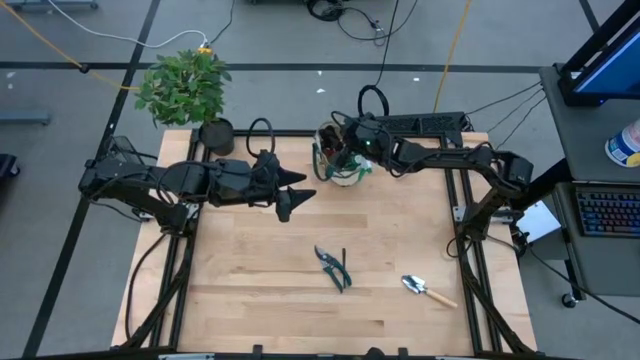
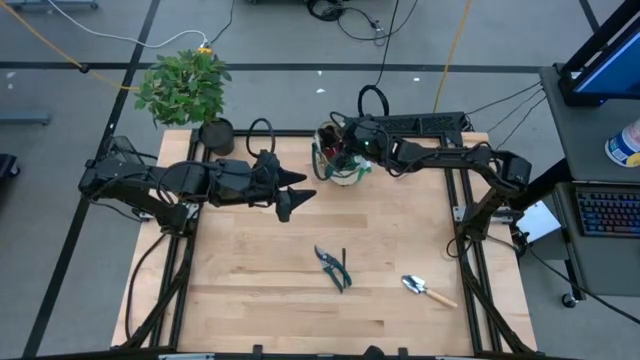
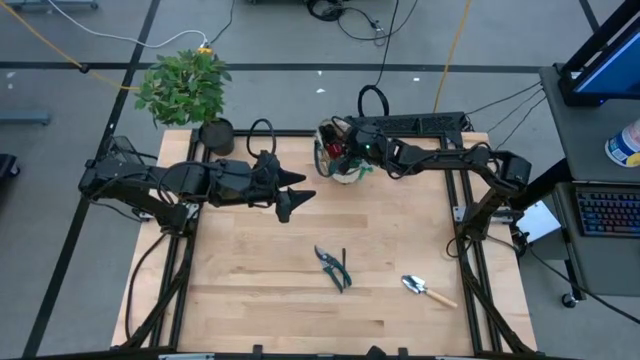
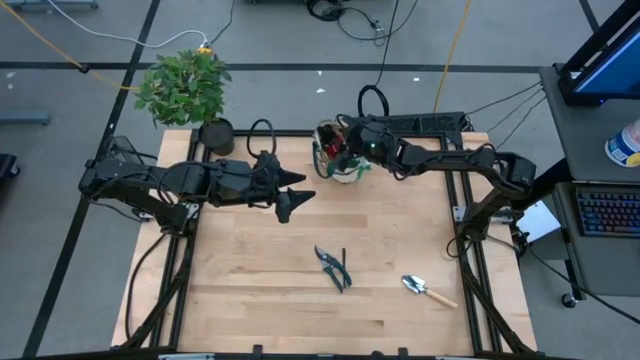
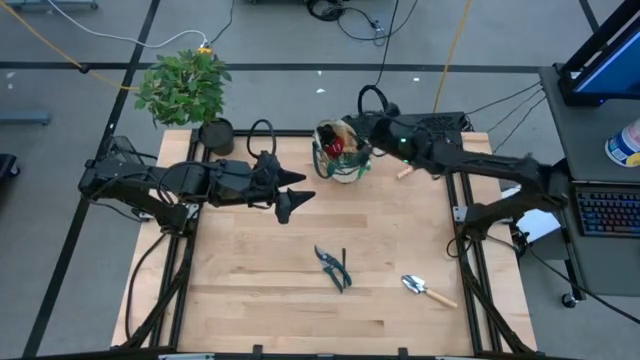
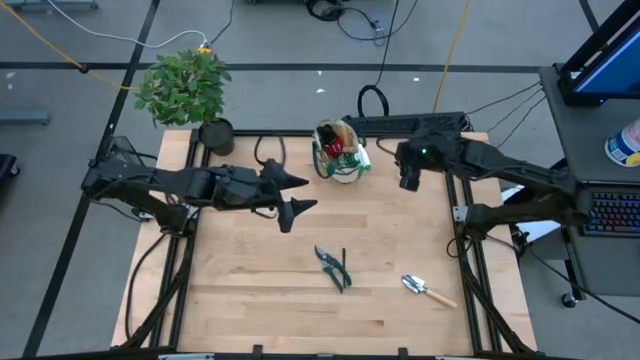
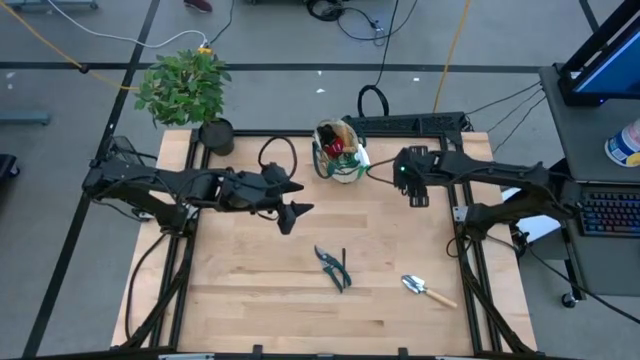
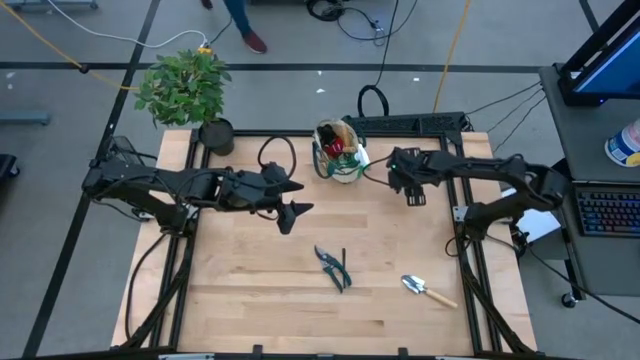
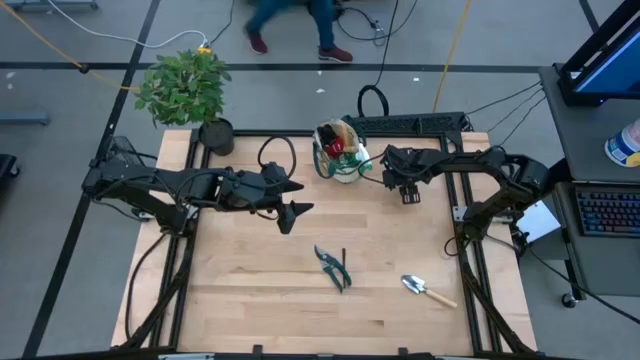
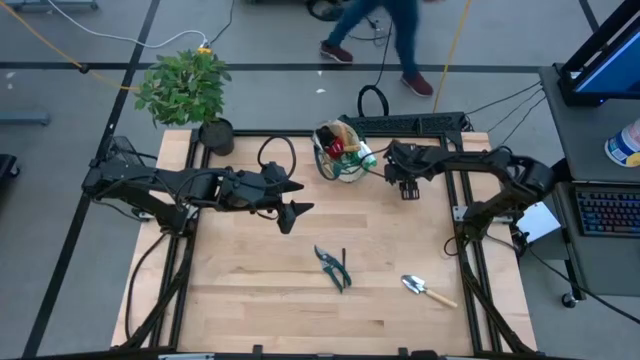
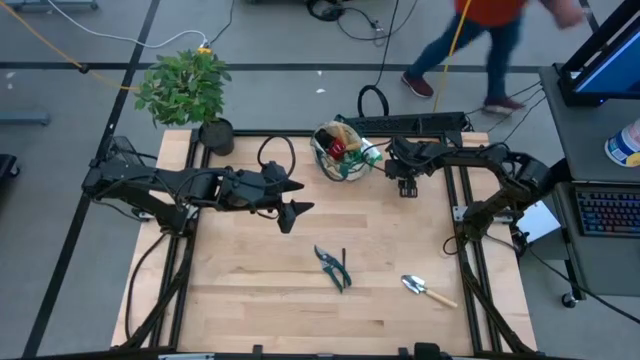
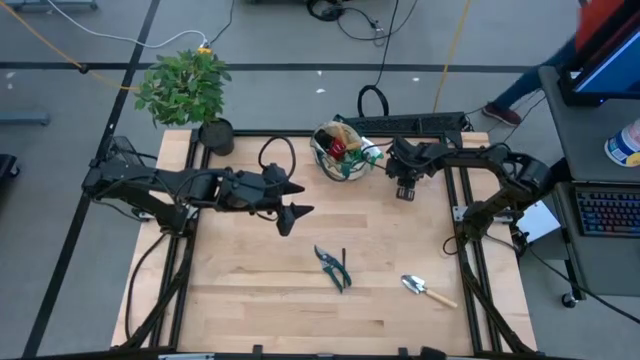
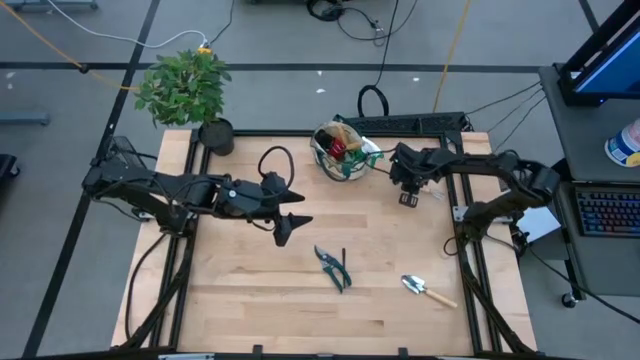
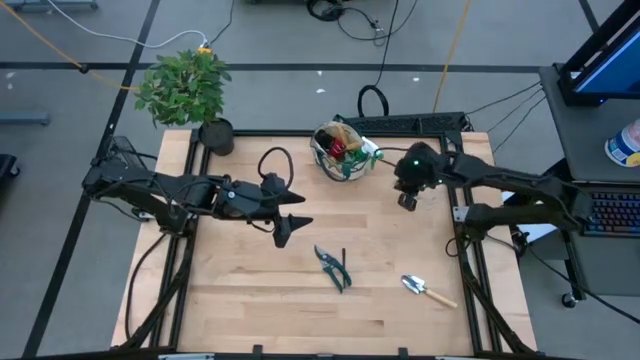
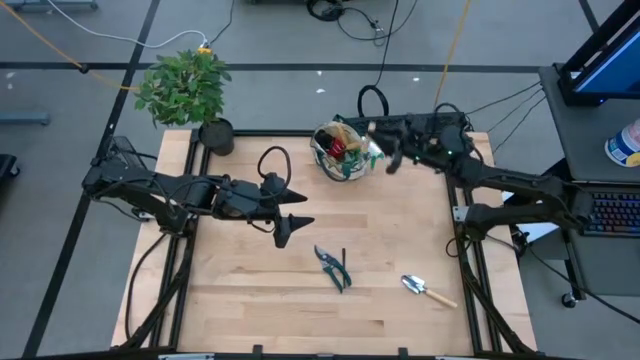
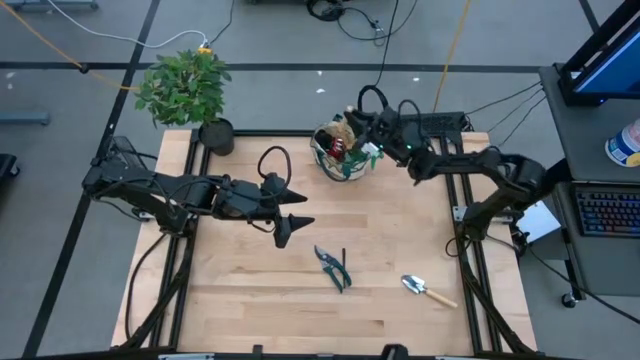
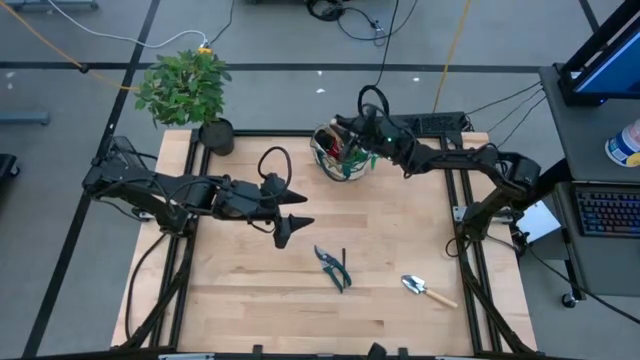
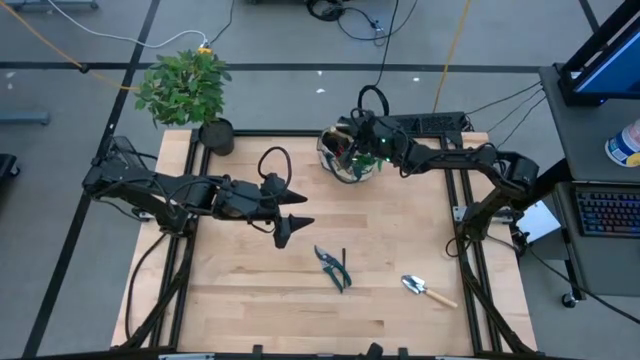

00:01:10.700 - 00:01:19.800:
Task: Pick & Place Garden tools in Gardening bag
Put the hand rake into the gardening bag

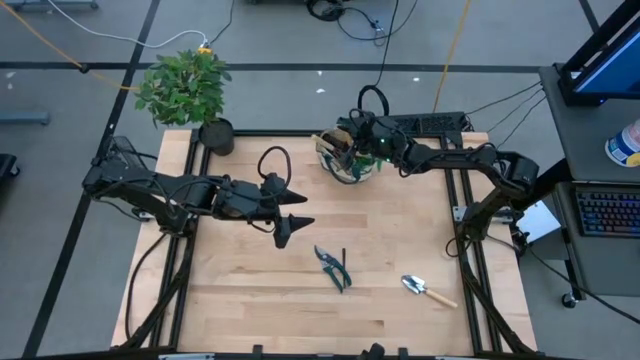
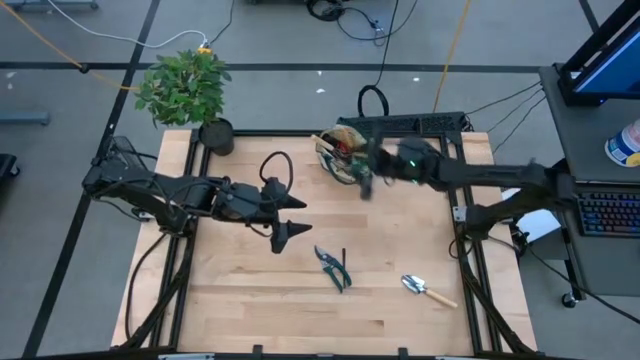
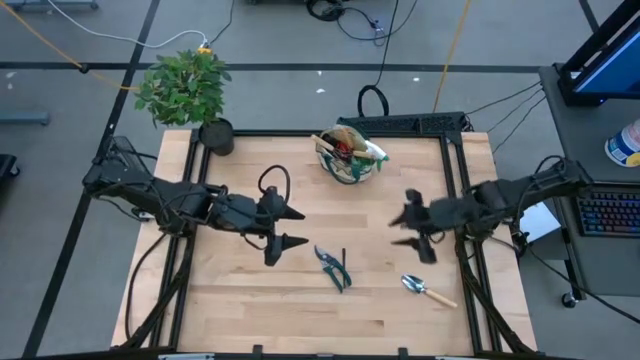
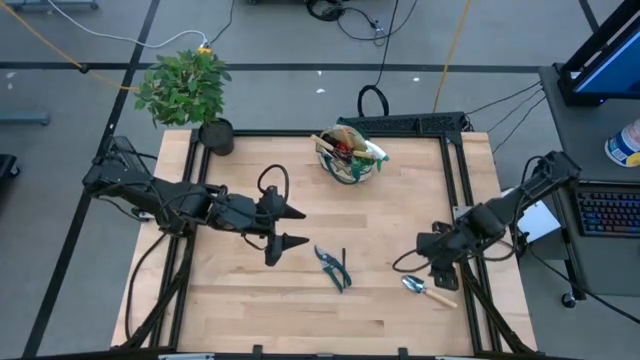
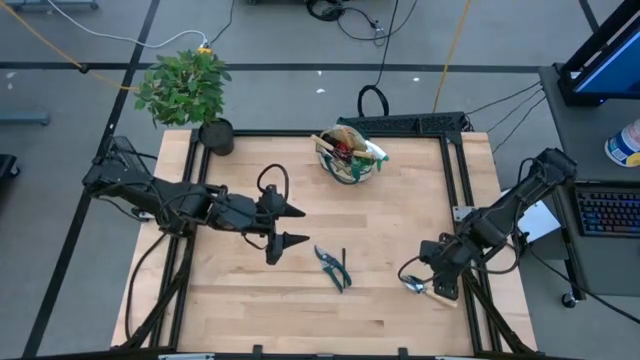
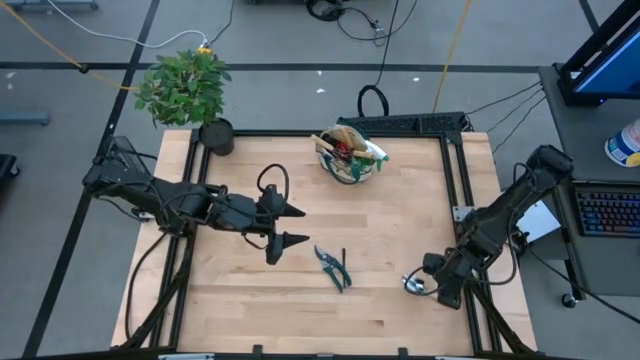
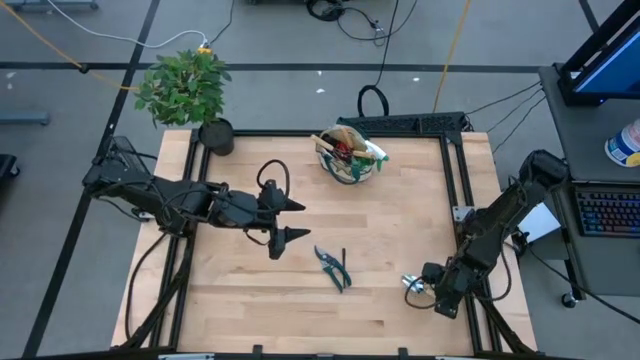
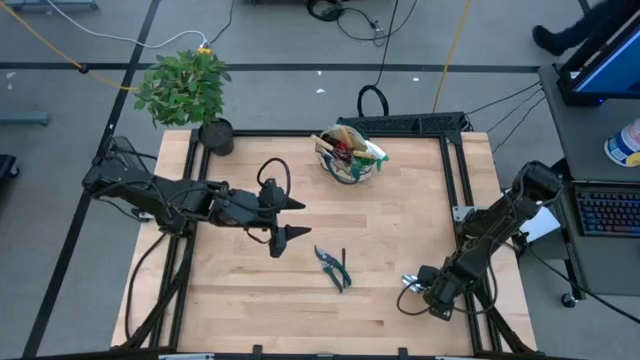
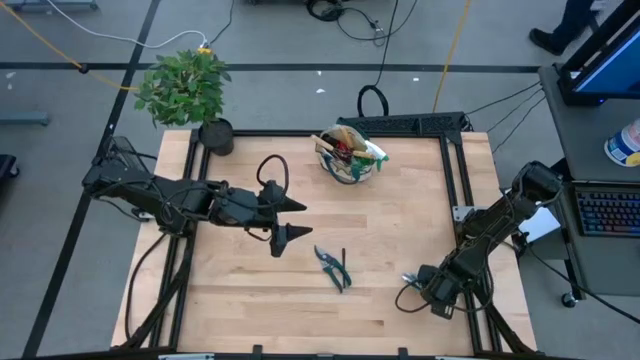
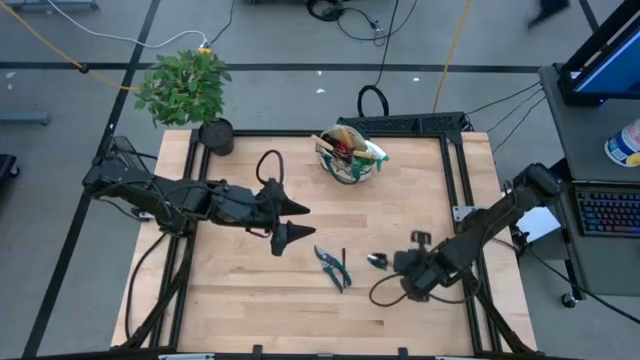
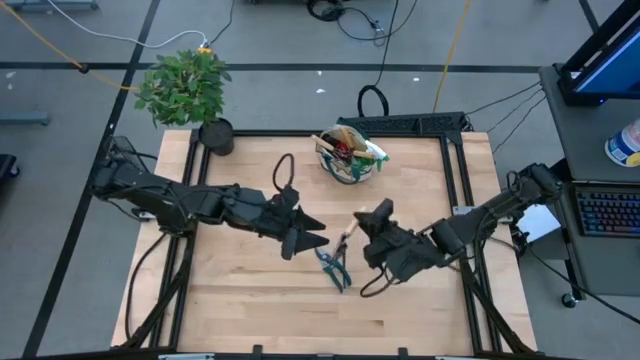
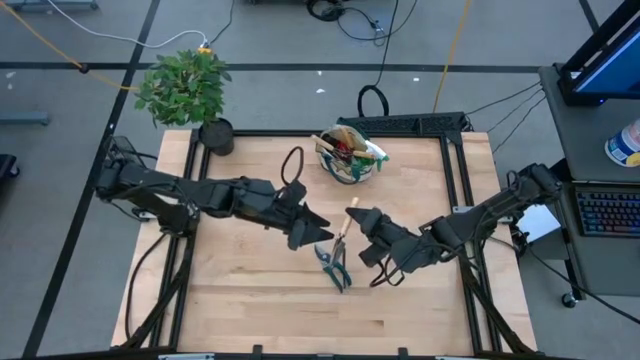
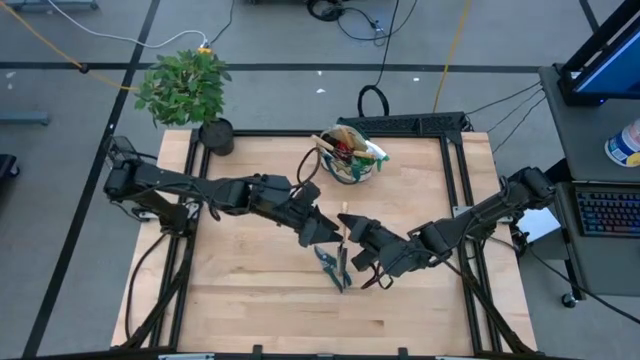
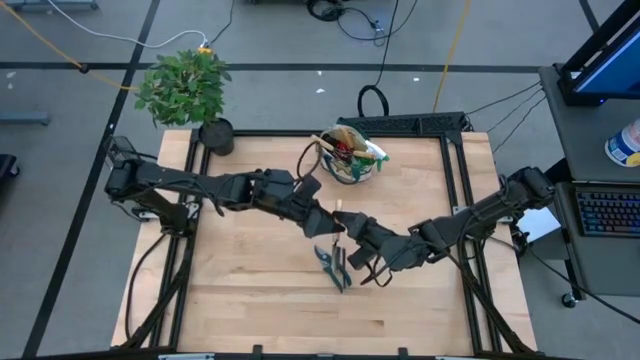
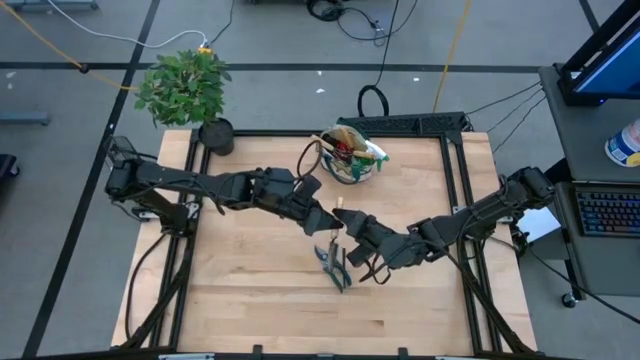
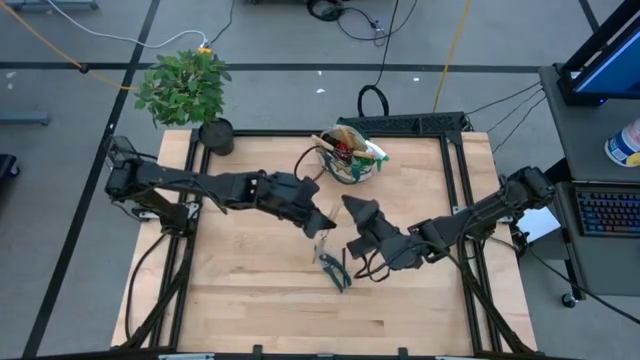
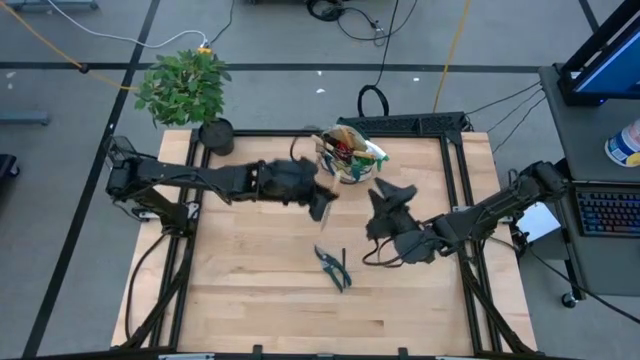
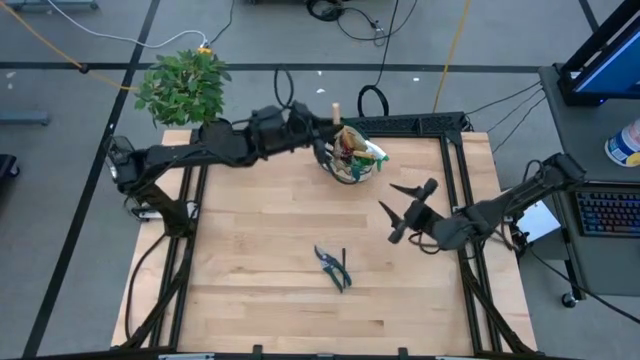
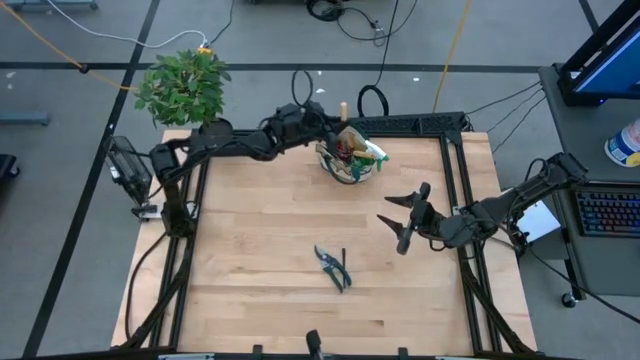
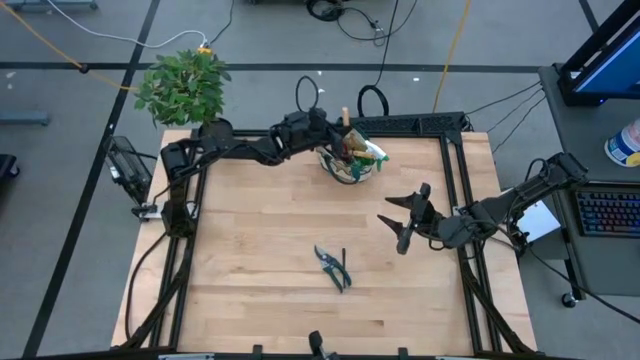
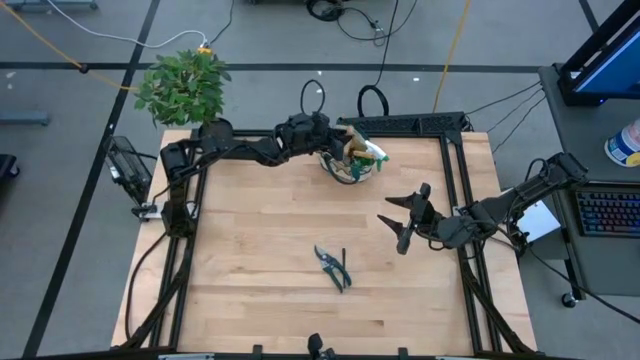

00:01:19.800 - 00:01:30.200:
Put the trowel into the gardening bag

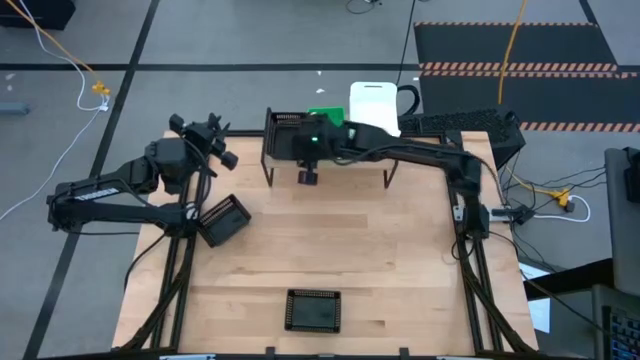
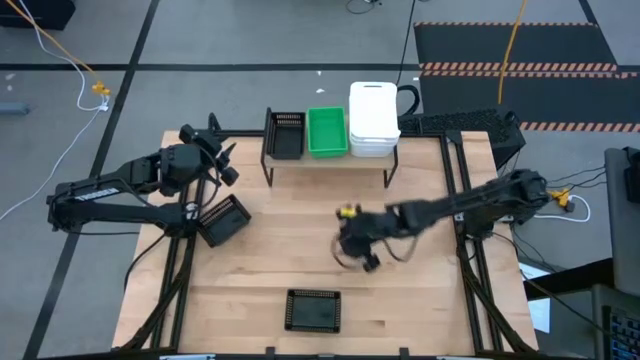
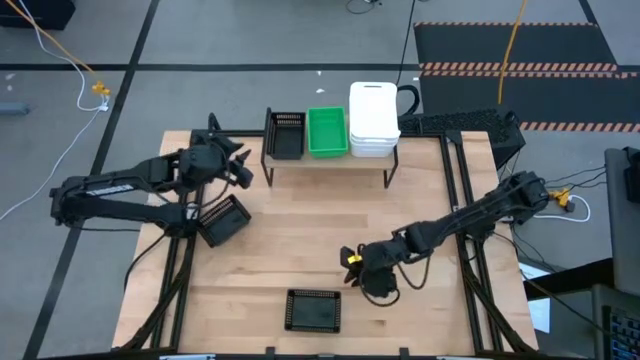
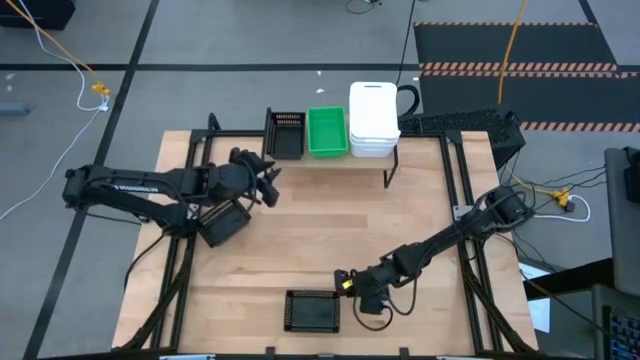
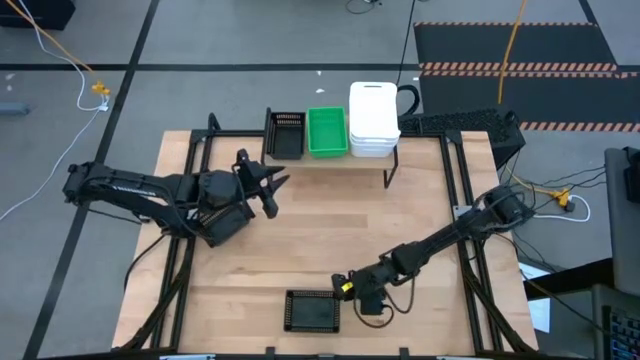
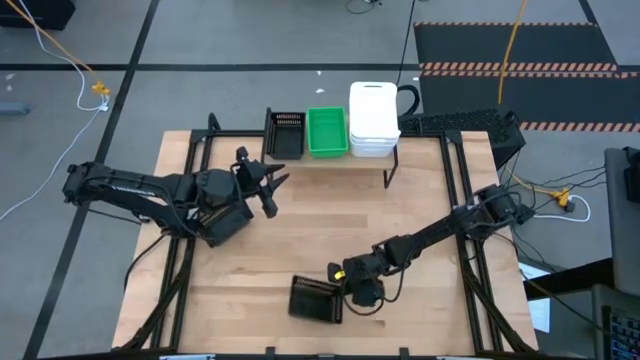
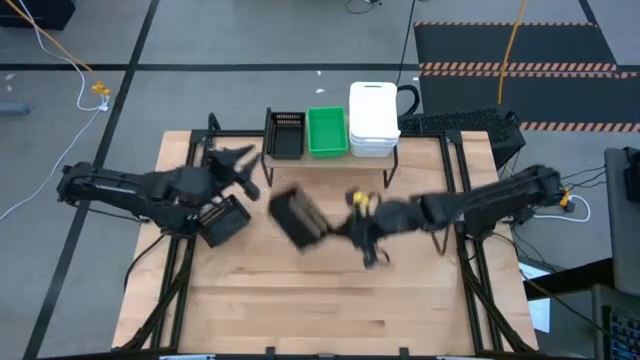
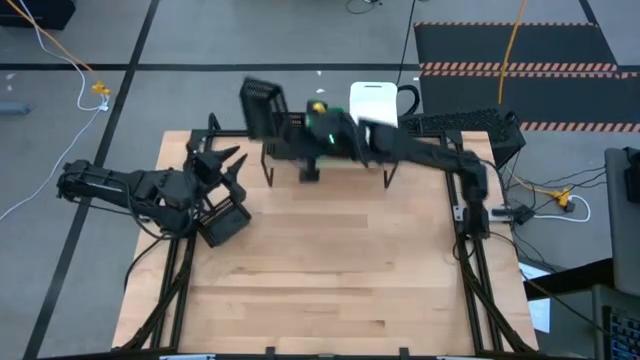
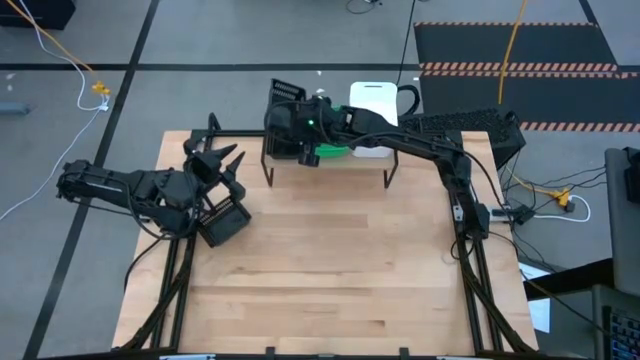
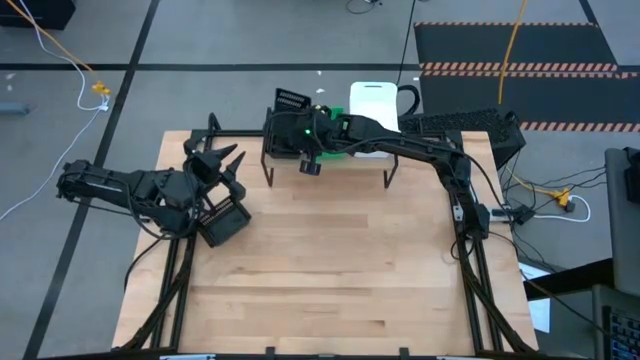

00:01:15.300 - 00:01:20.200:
Task: Stack baskets on shelf by color
Stack the bottom black bin on top of the other black bin on the shelf
